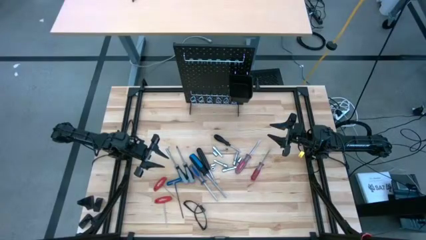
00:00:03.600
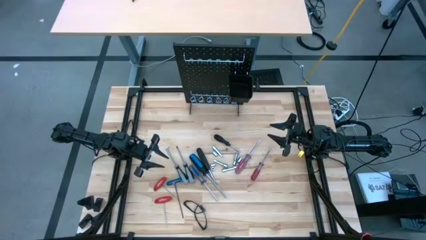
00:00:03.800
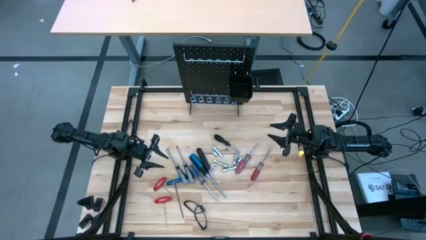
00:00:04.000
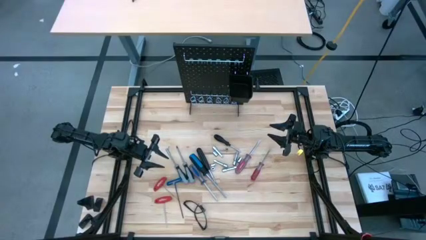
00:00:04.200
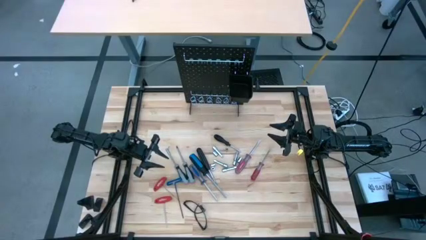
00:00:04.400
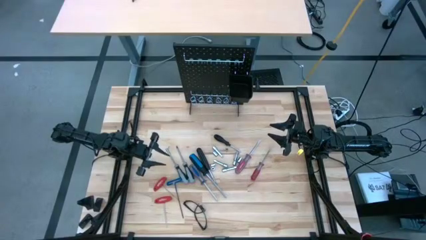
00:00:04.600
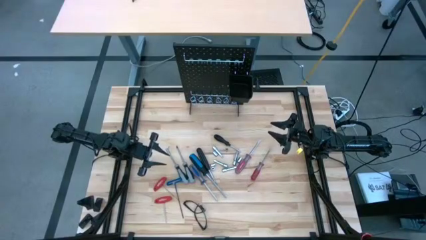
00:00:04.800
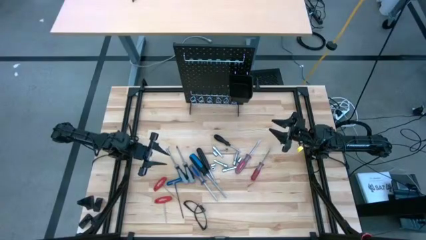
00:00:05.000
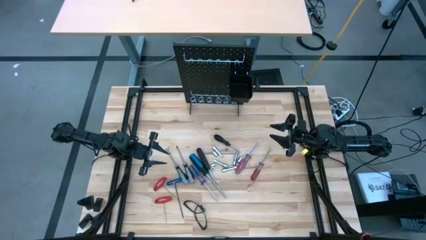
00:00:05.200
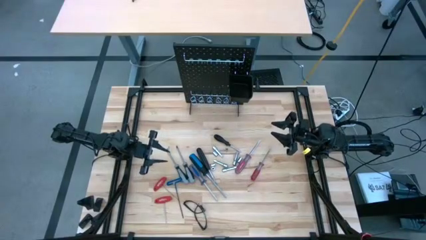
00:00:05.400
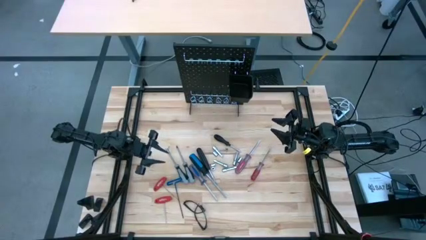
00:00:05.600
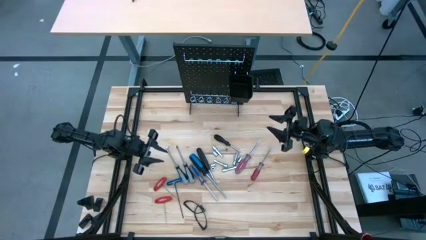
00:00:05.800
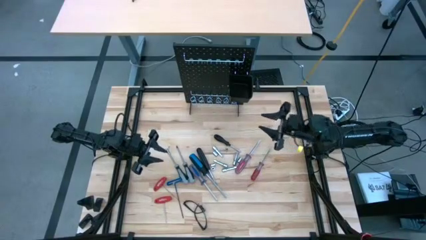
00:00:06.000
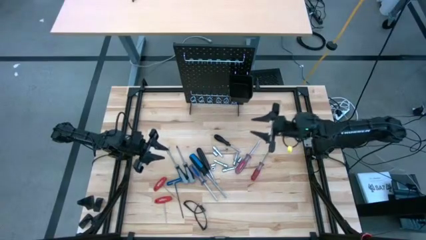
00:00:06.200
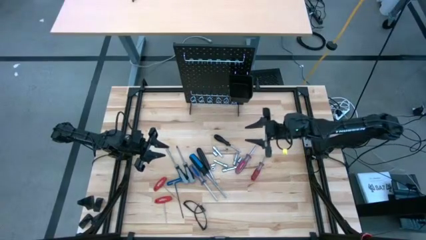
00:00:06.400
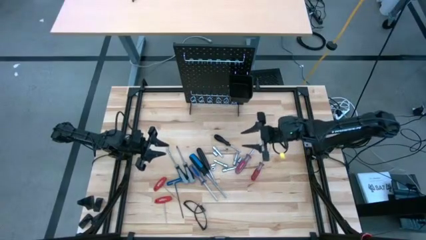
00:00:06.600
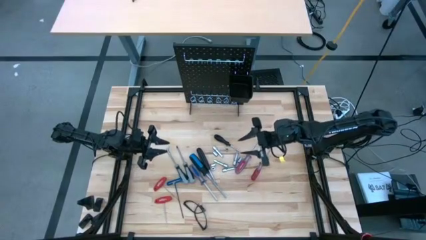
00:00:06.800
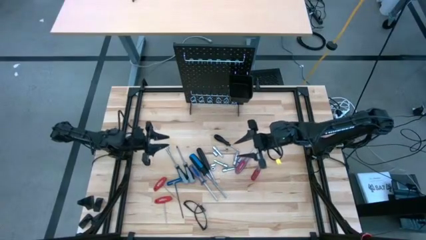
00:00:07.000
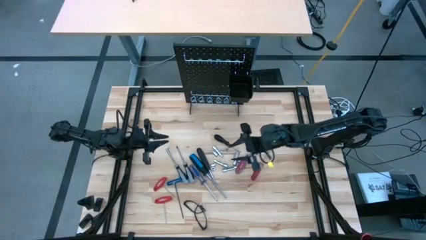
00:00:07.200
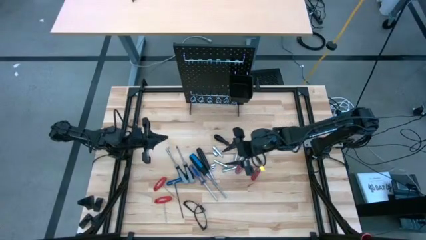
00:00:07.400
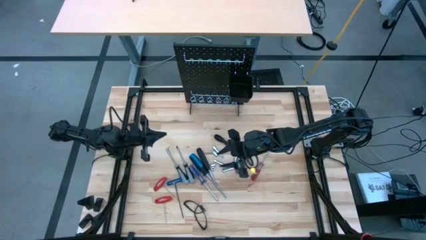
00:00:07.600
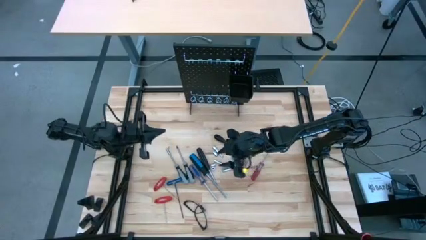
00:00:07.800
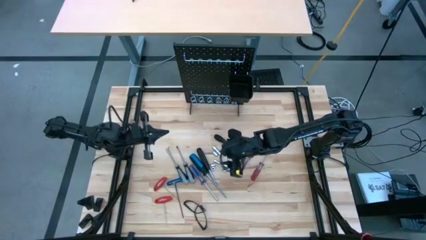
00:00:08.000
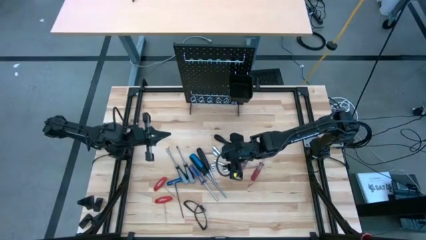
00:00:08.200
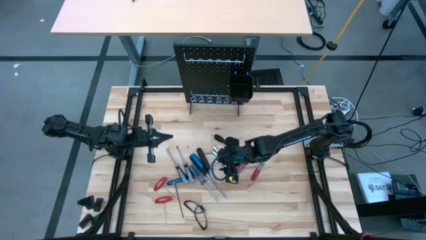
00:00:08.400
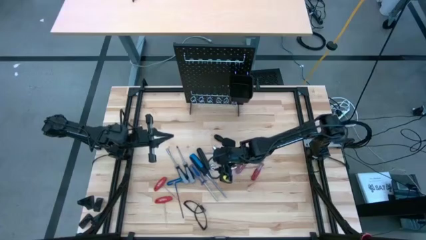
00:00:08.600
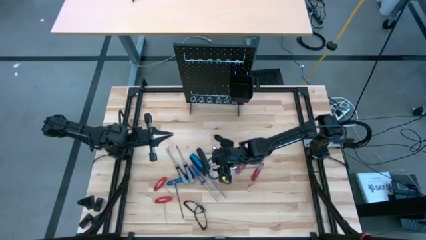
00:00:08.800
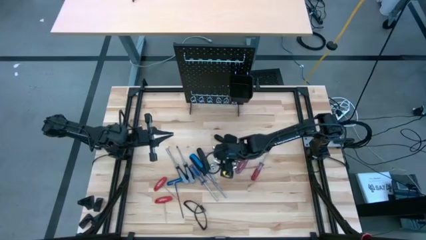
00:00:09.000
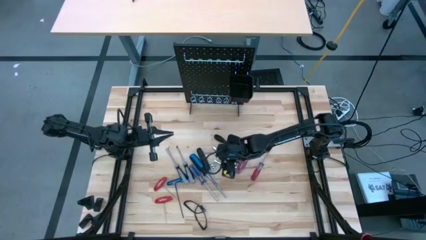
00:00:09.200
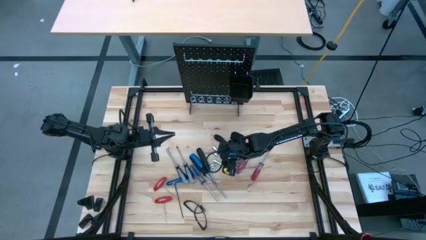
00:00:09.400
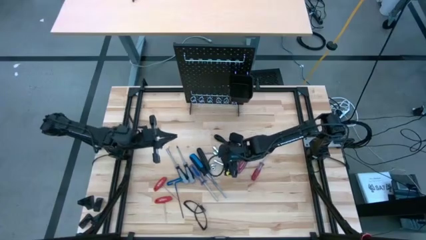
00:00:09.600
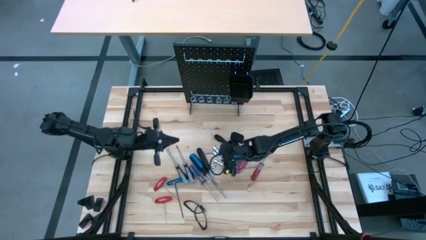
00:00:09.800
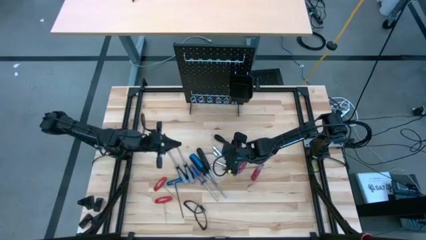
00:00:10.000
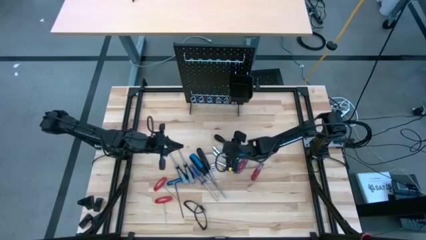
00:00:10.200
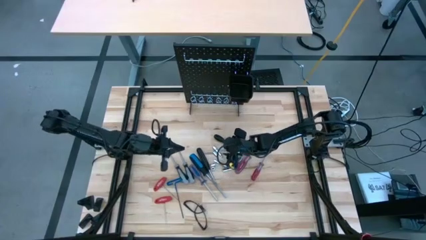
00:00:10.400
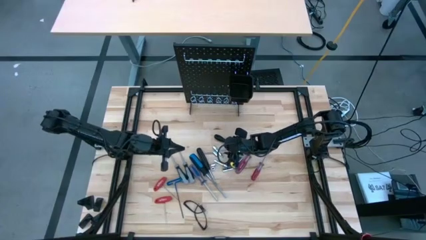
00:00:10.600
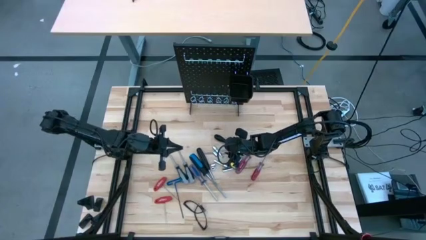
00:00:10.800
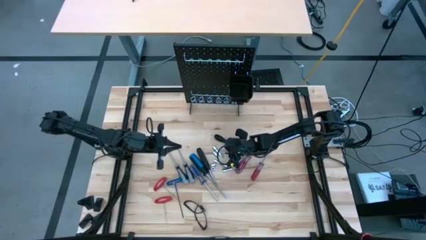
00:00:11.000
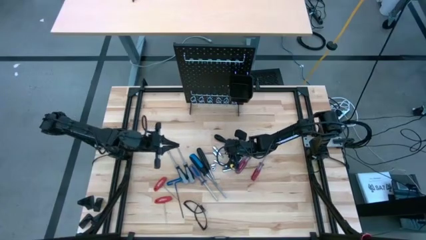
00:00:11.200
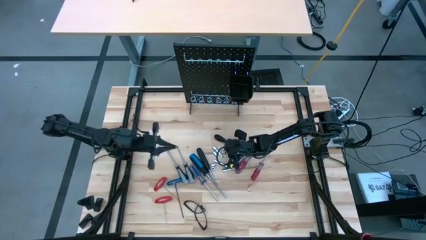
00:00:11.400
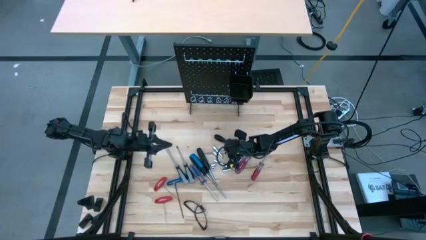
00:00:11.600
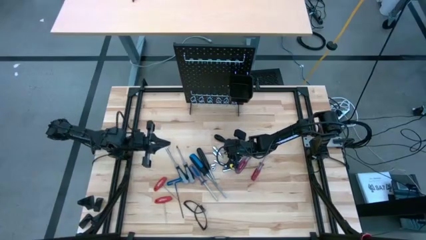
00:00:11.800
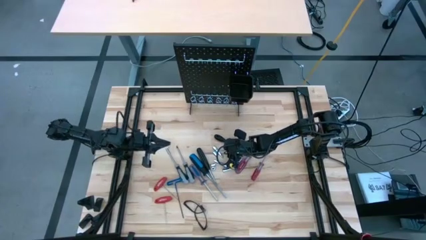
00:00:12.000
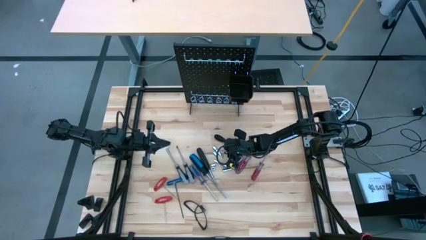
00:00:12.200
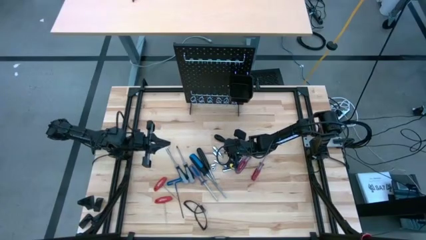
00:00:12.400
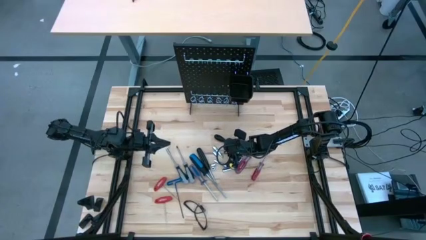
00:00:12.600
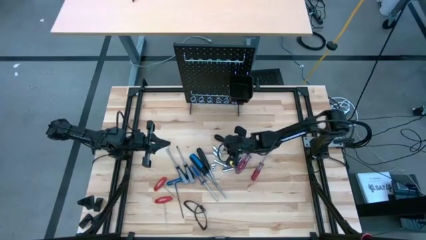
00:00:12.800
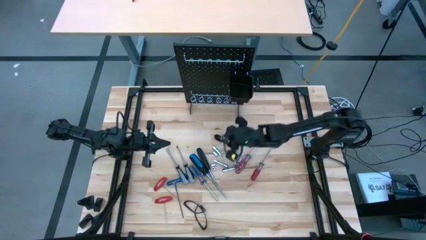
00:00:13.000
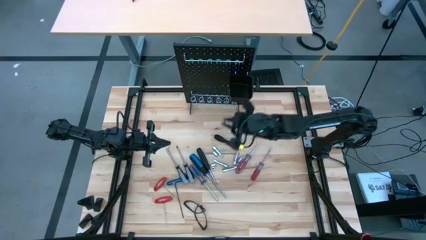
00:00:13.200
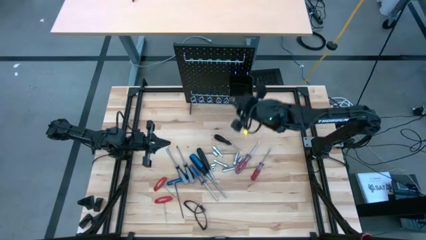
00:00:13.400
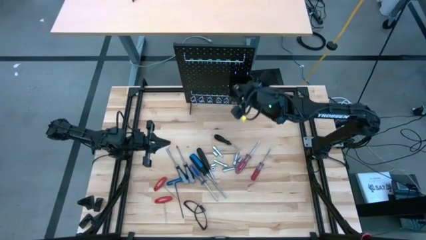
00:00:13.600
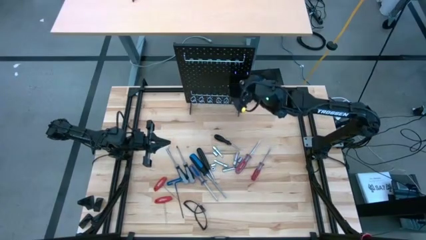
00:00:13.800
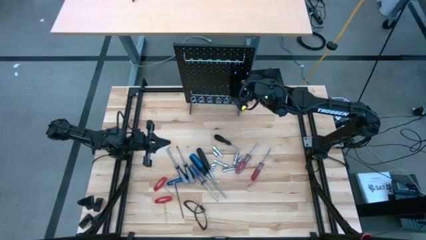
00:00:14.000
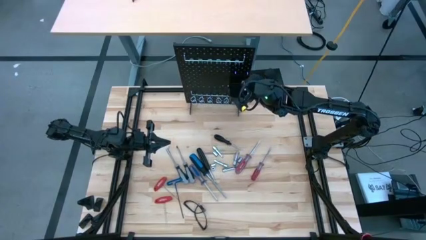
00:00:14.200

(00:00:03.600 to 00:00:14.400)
Task: Hang tools onto peg board
Put the socket into the black bin on the pegboard

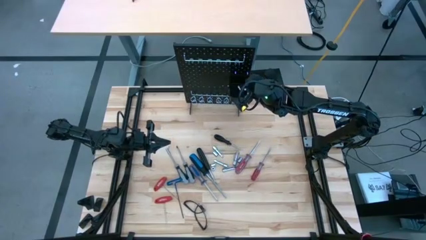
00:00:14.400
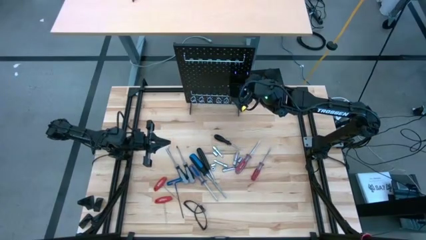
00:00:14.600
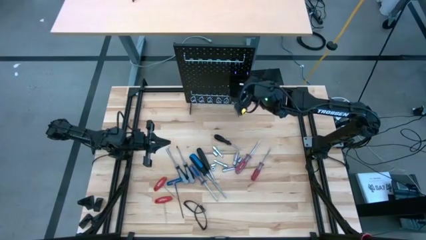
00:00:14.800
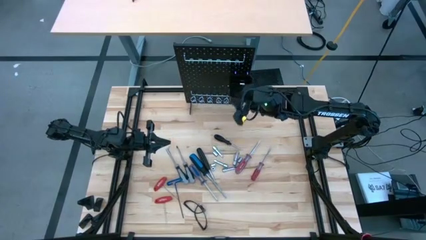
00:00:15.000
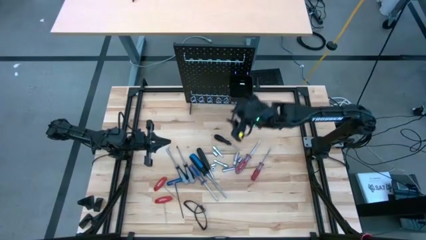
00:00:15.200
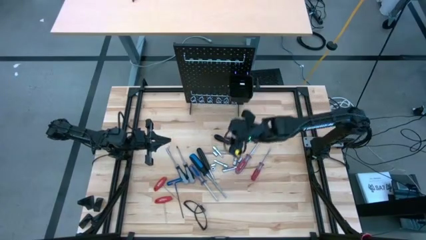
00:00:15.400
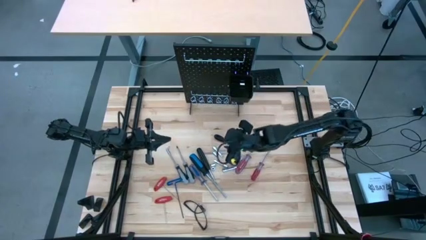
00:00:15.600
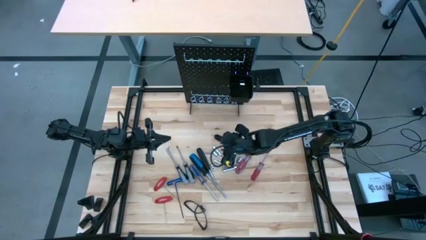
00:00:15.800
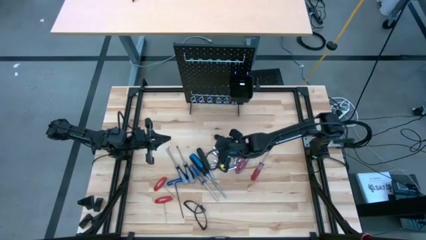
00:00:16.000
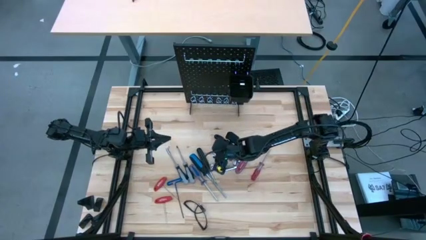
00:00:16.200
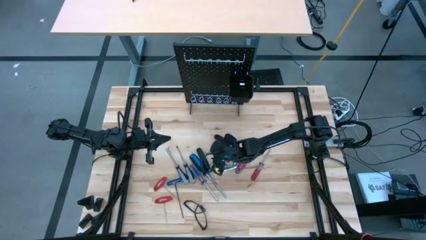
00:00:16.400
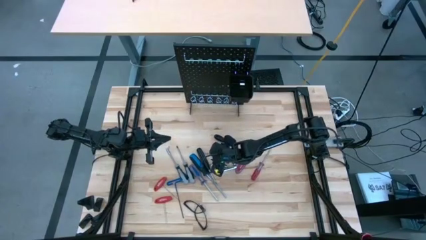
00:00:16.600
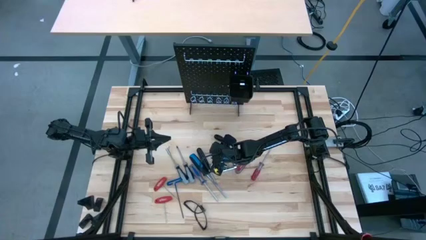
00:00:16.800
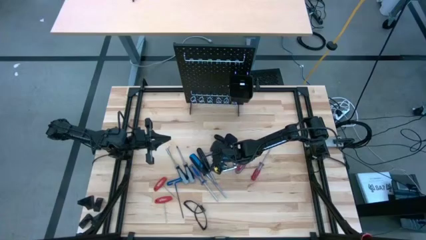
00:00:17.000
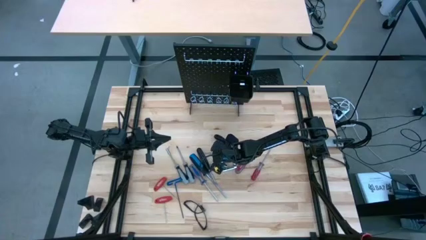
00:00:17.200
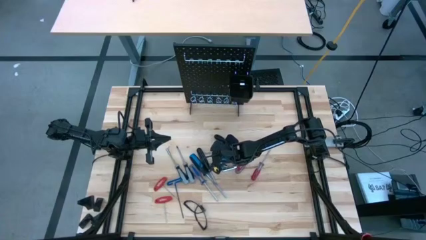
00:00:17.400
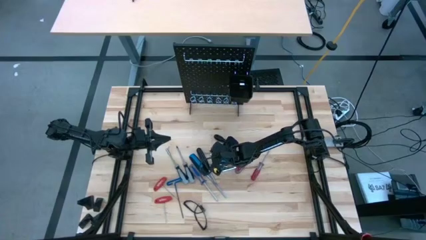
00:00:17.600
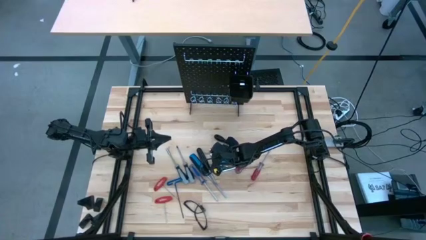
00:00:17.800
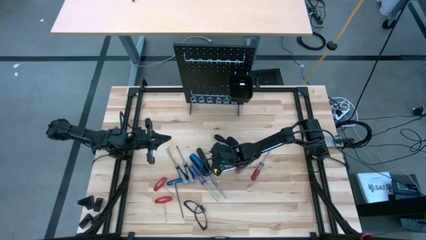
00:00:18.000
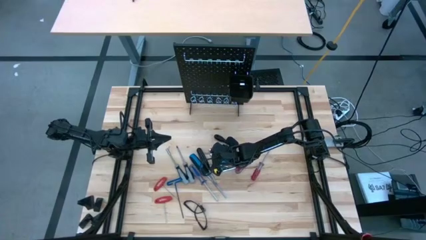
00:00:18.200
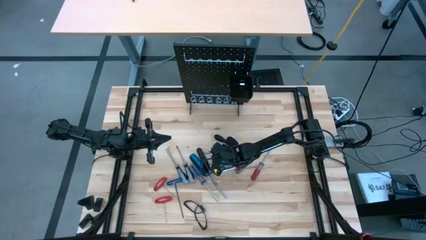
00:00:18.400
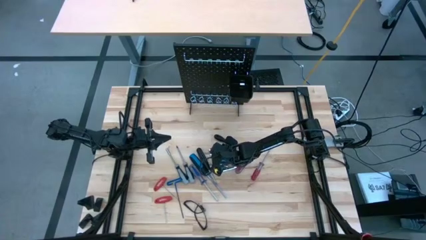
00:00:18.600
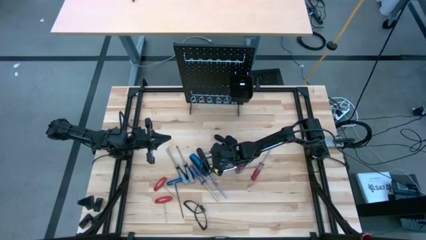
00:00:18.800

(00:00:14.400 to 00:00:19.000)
Put the extension bar into the black bin on the pegboard

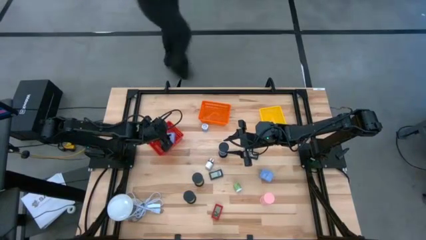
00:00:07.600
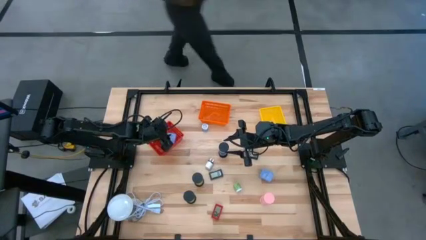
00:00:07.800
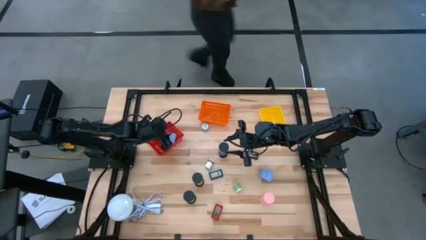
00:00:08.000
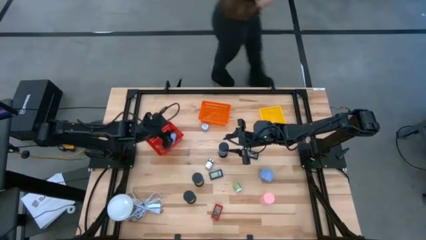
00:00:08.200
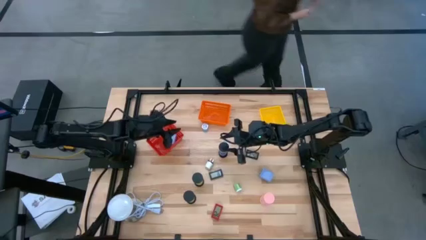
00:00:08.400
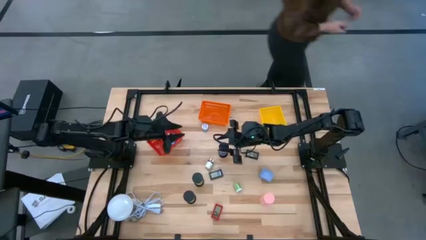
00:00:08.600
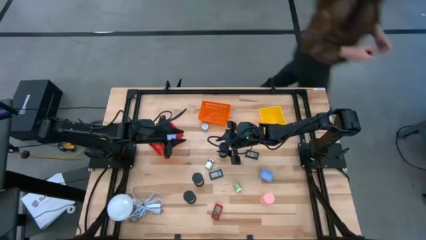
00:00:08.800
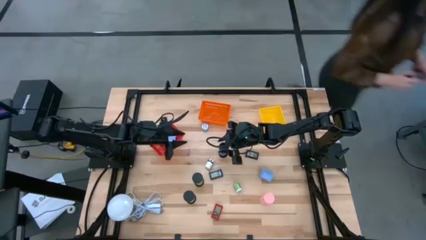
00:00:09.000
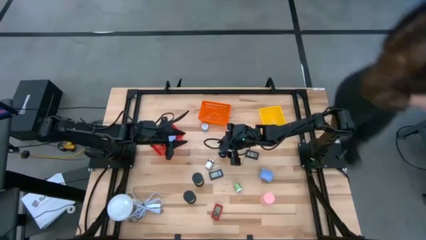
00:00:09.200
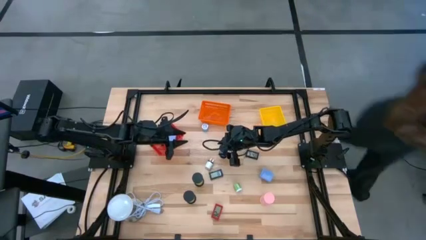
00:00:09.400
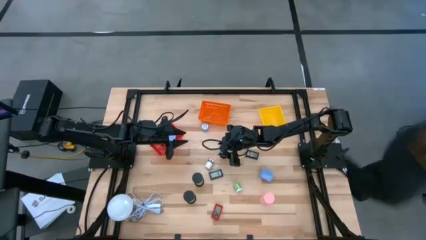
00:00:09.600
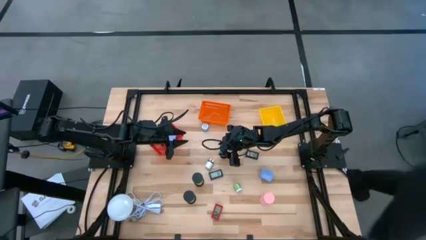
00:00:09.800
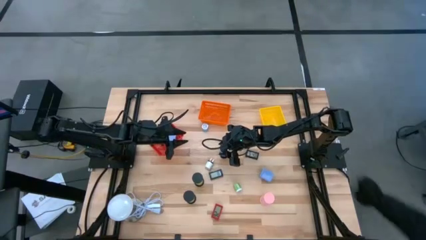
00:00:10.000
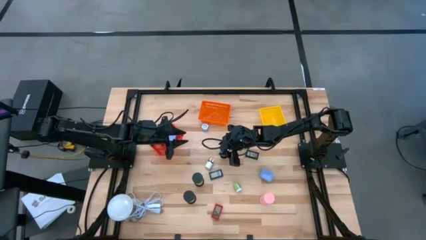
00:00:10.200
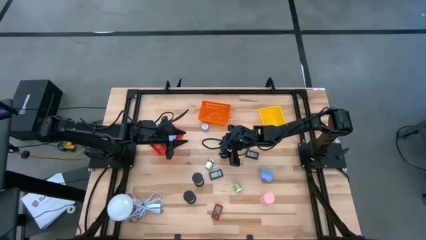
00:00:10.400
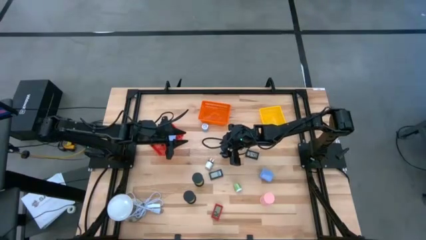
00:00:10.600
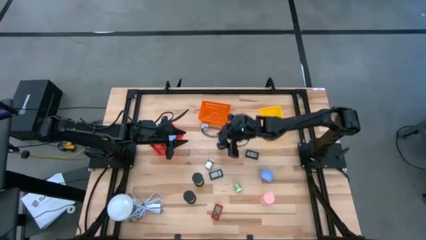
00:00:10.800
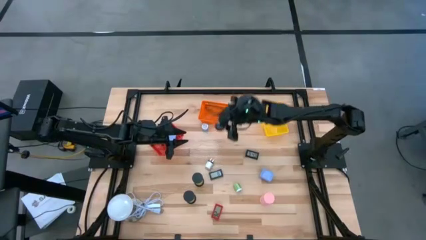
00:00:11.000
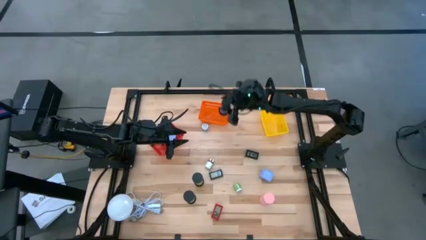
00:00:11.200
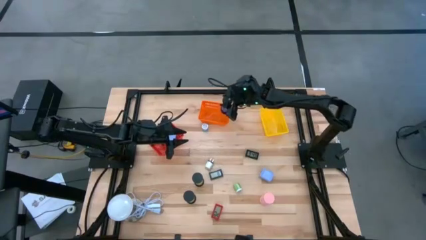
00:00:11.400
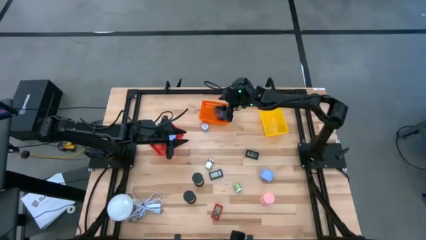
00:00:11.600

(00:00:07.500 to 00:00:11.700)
Task: Pick & Place Office items
Put the top black hourglass into the orange basket
